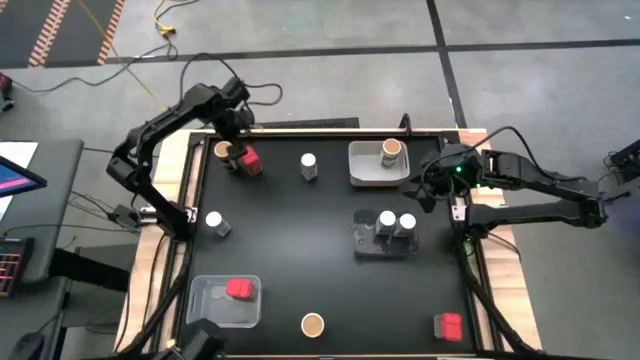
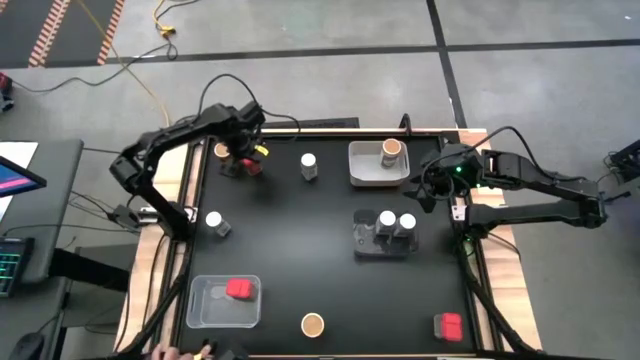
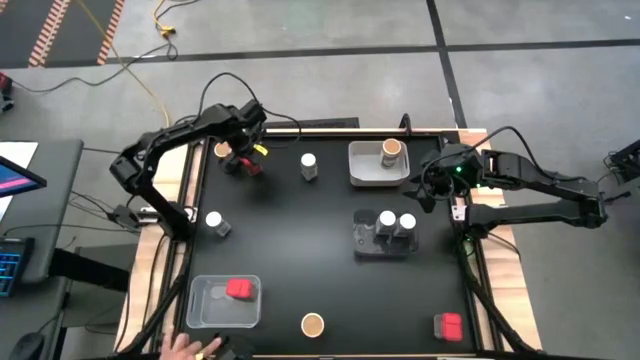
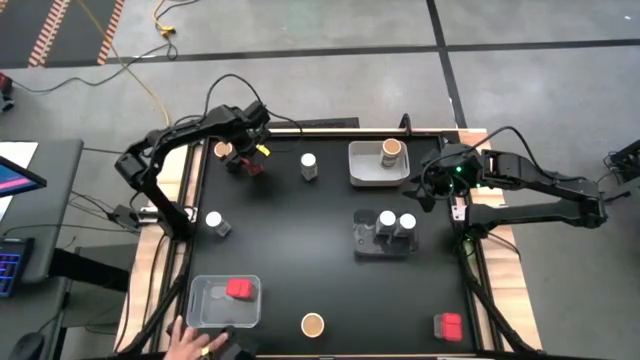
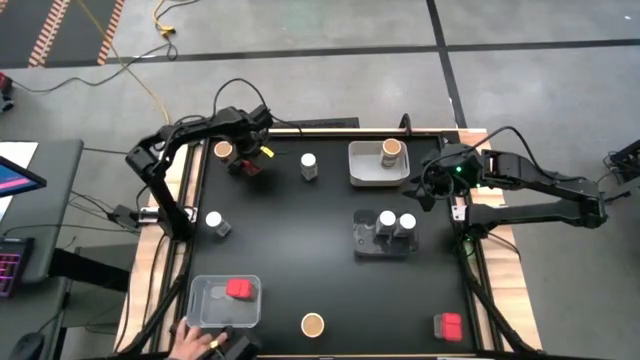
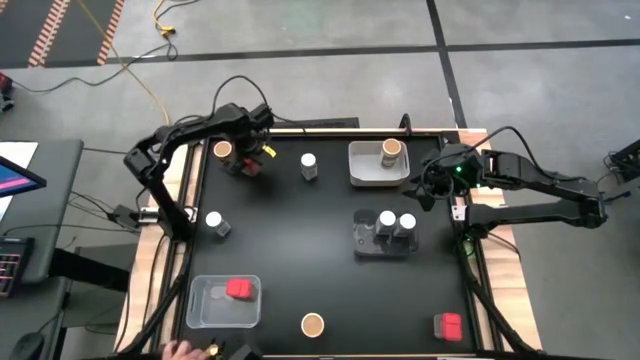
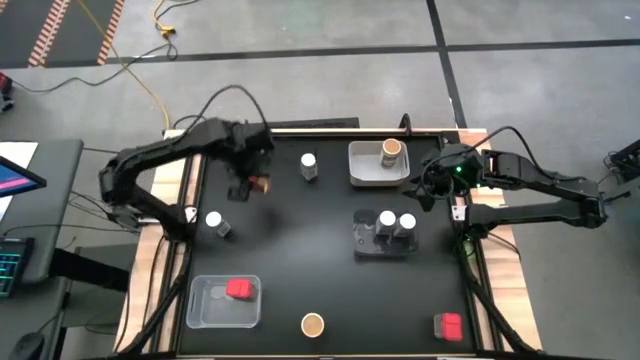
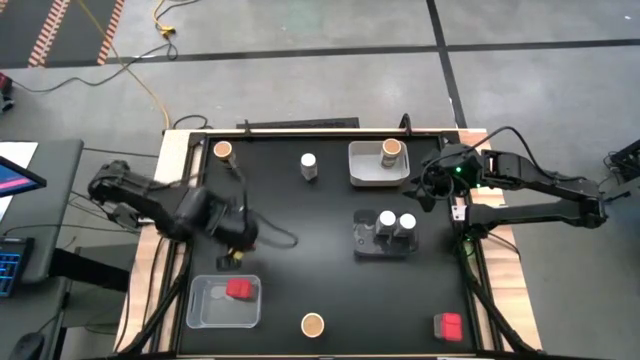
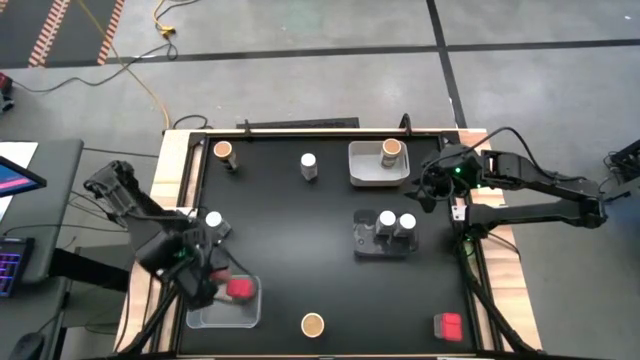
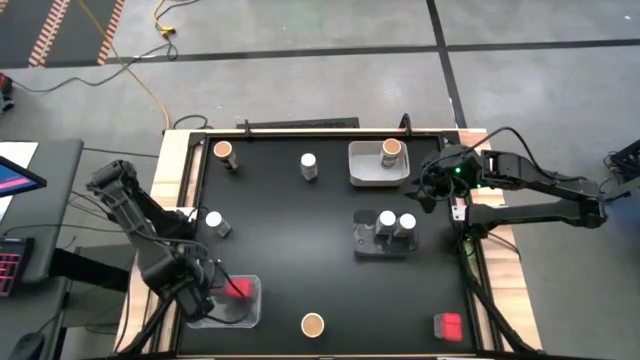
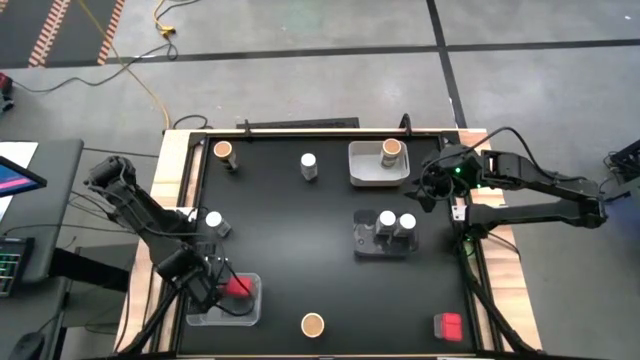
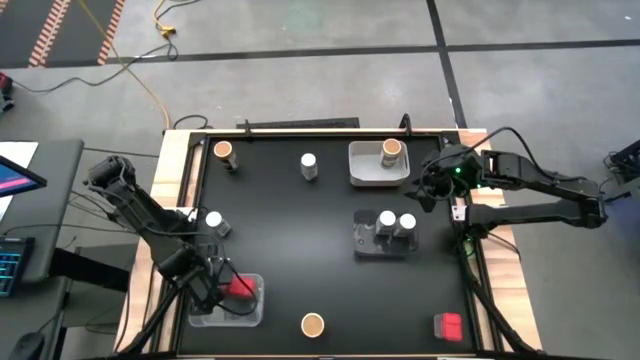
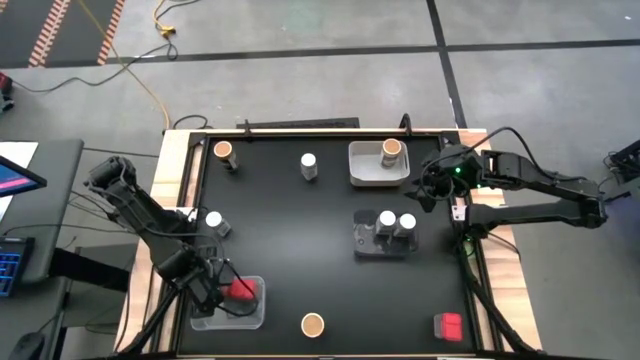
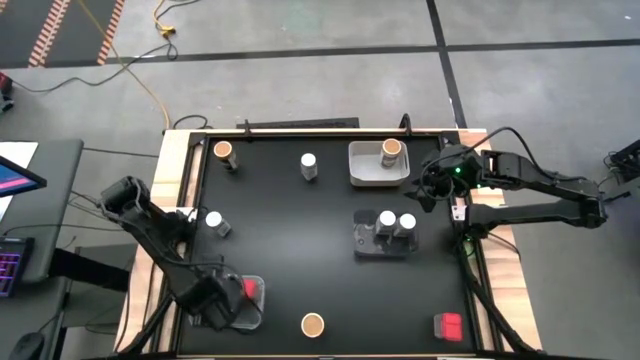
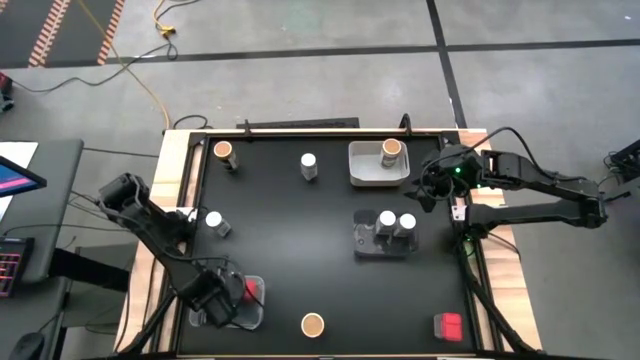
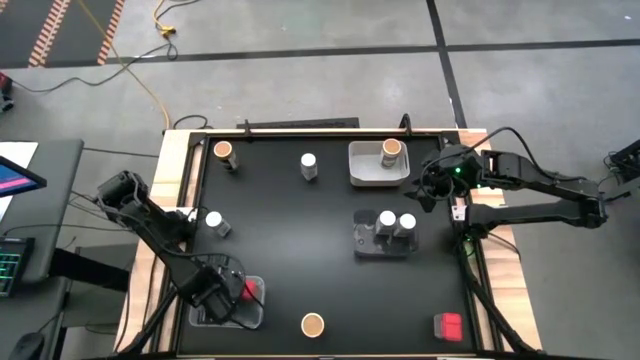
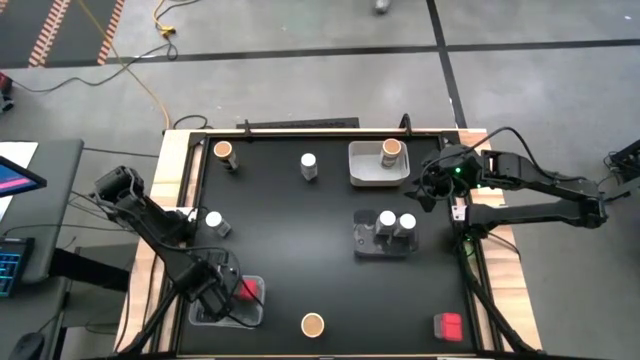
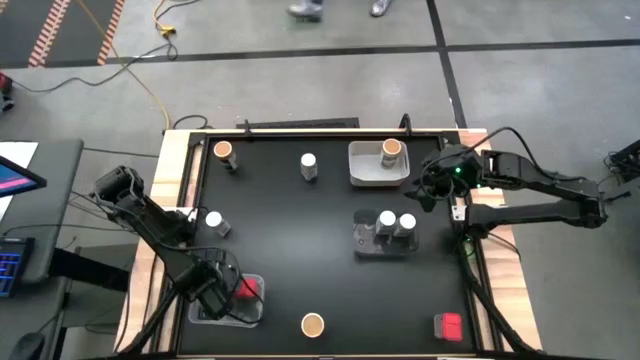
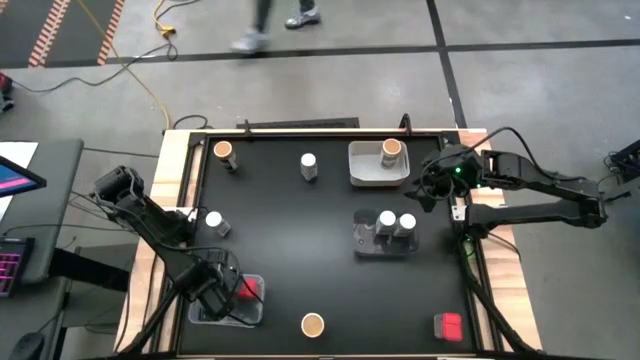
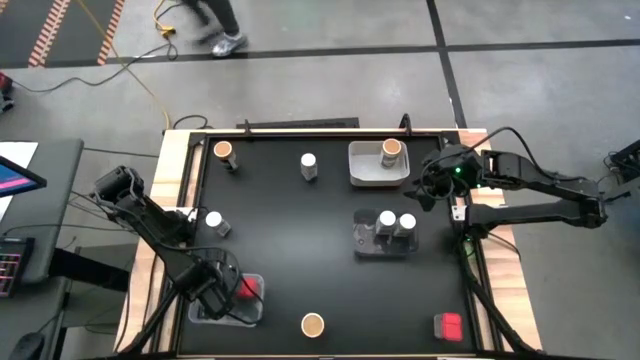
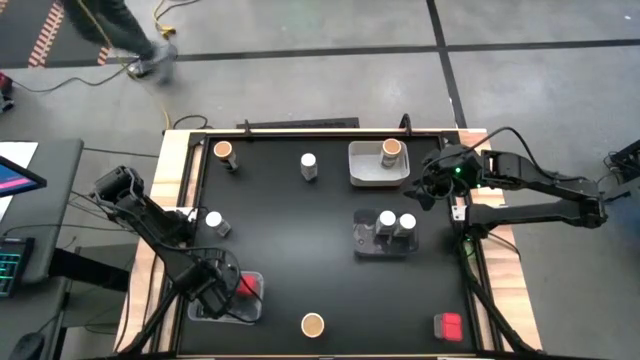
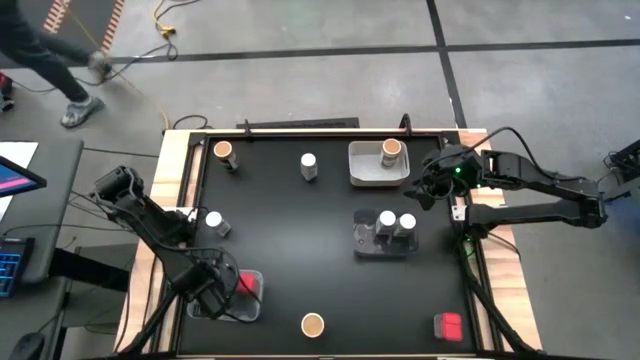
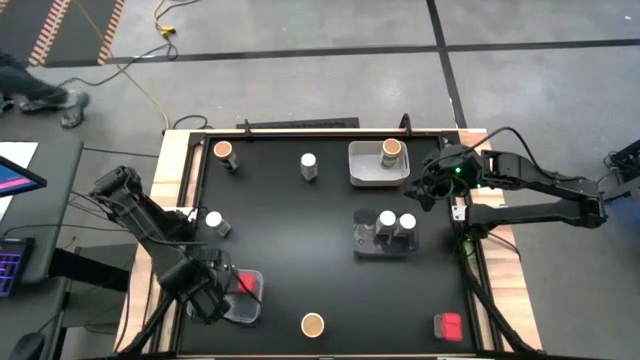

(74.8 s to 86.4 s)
Task: Sort spices by type
Put the top left red spice can in the transparent bin

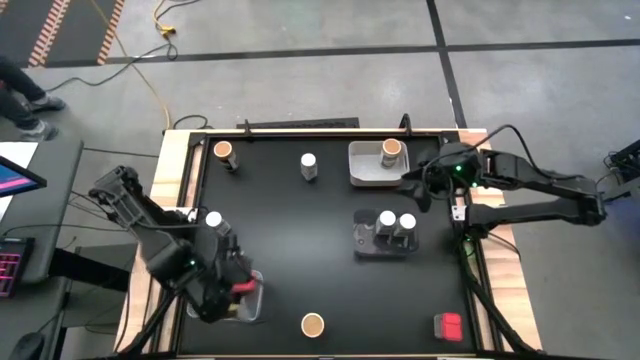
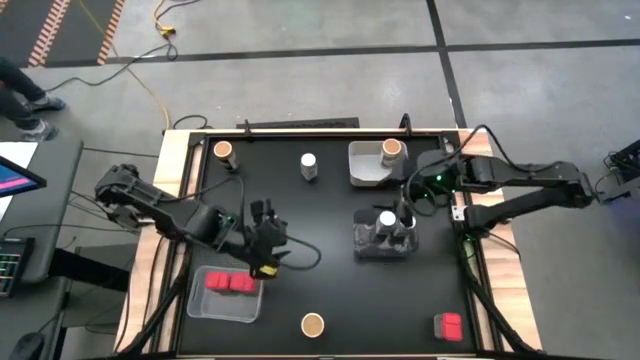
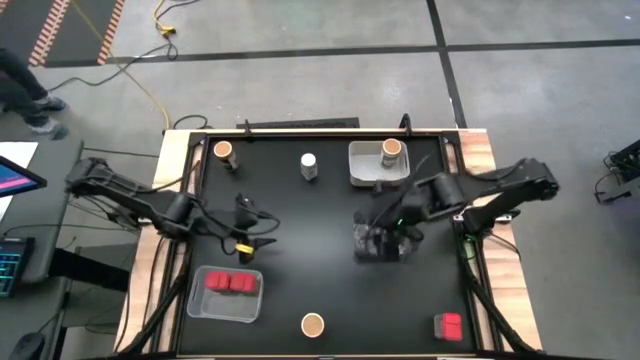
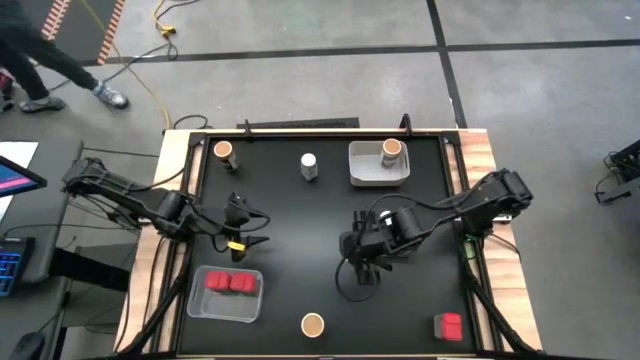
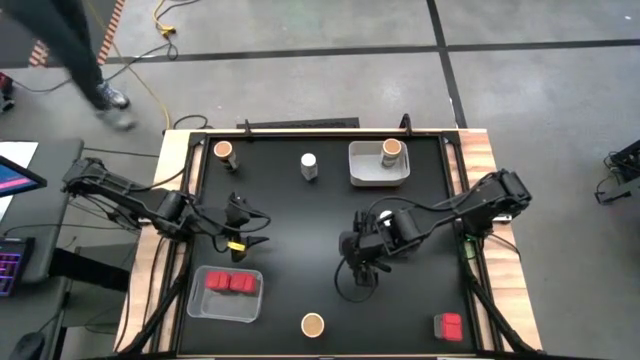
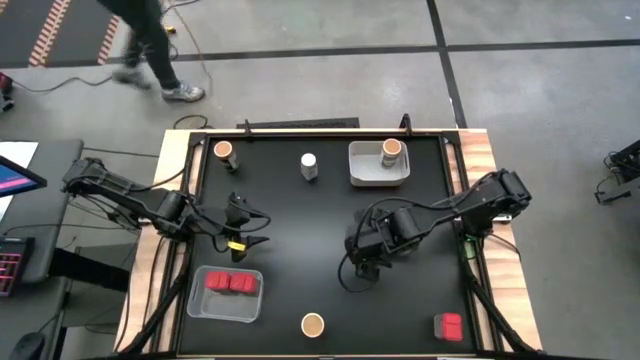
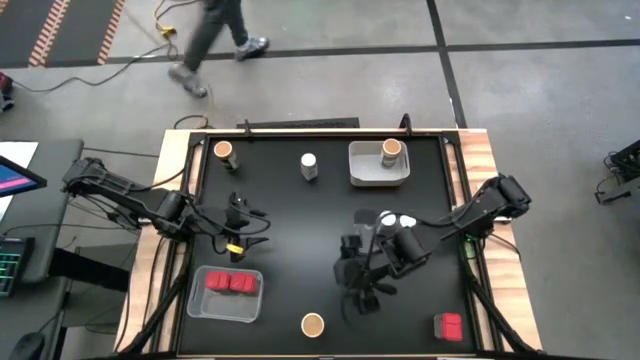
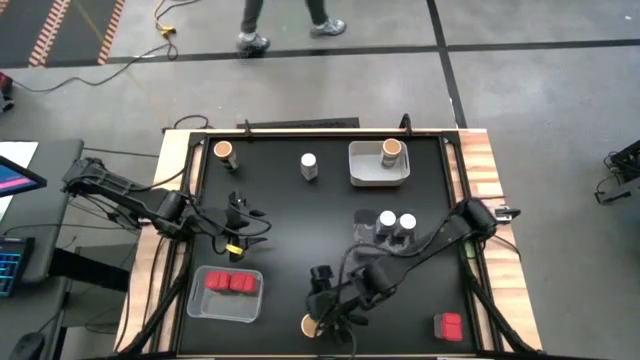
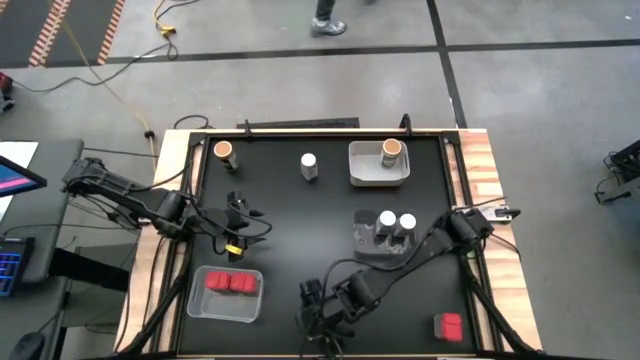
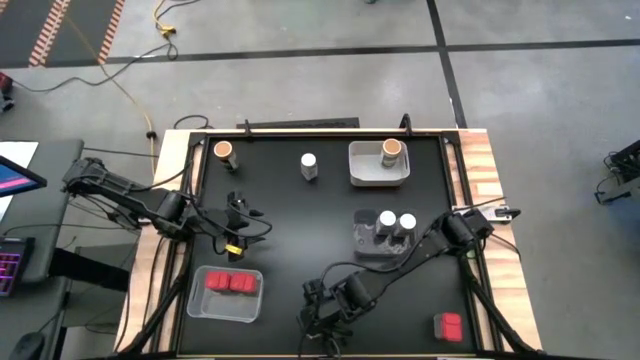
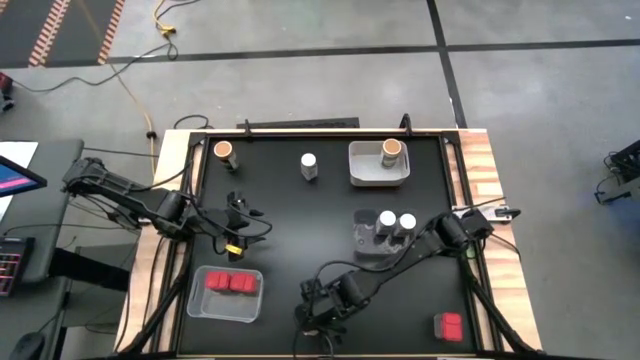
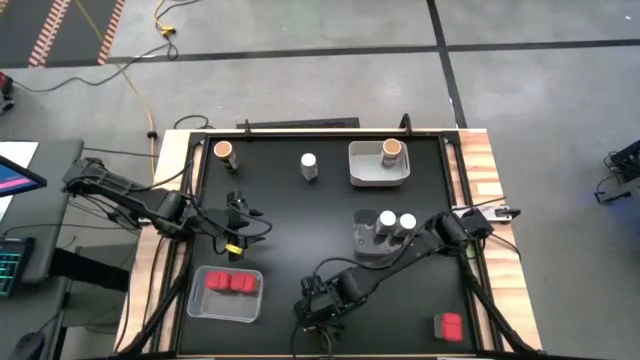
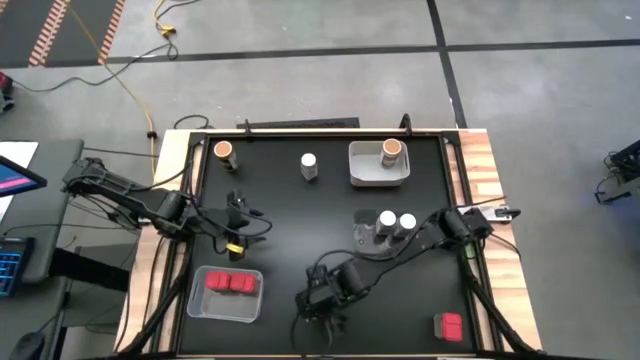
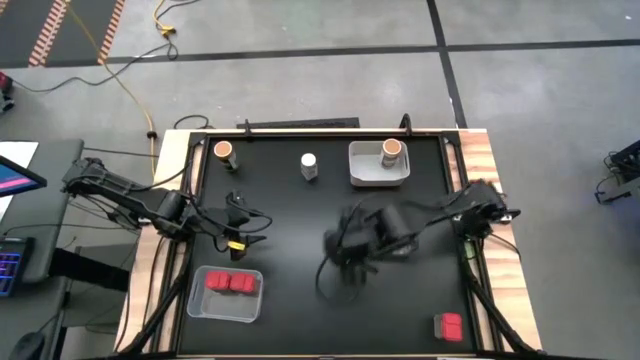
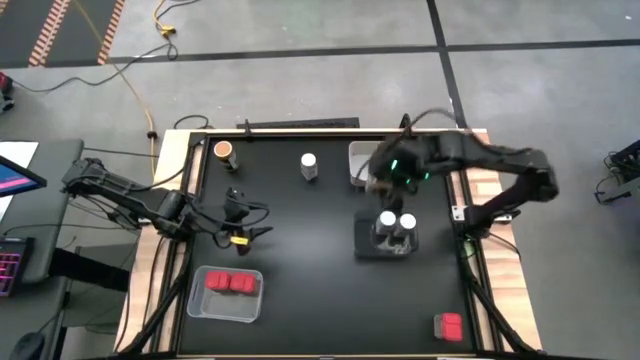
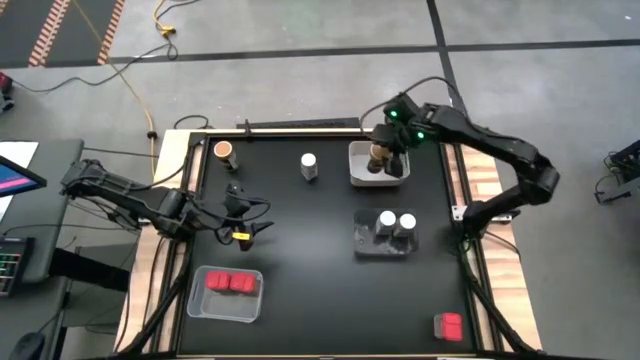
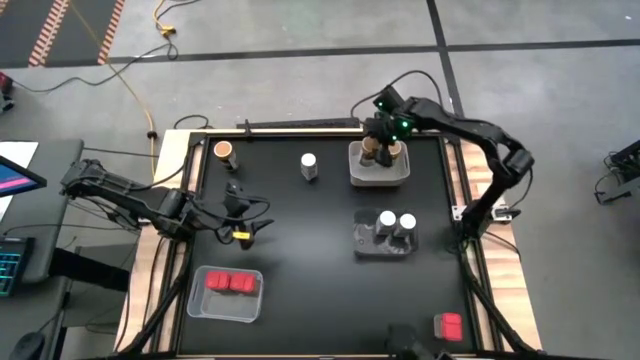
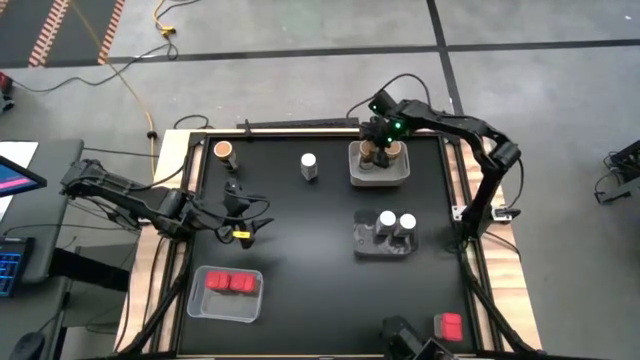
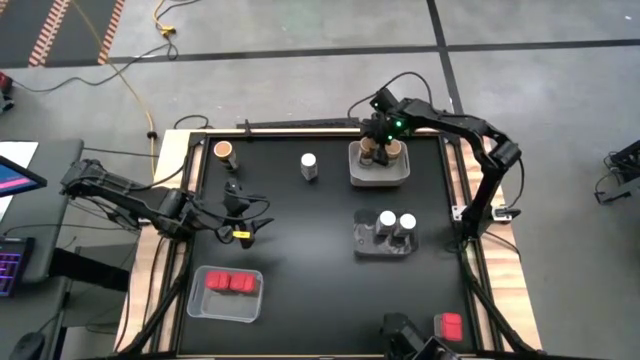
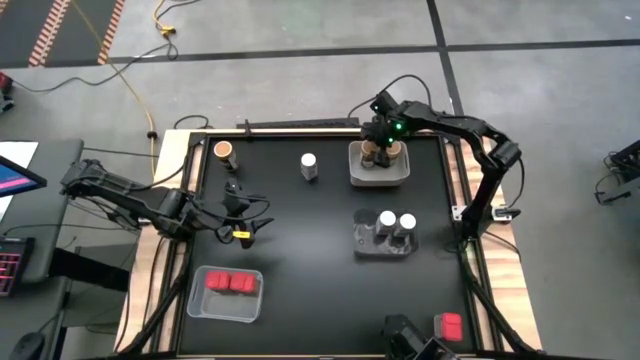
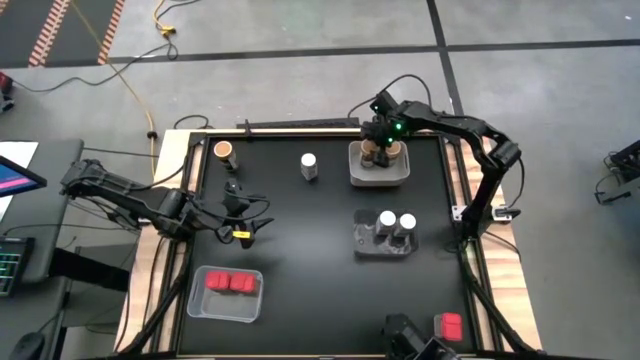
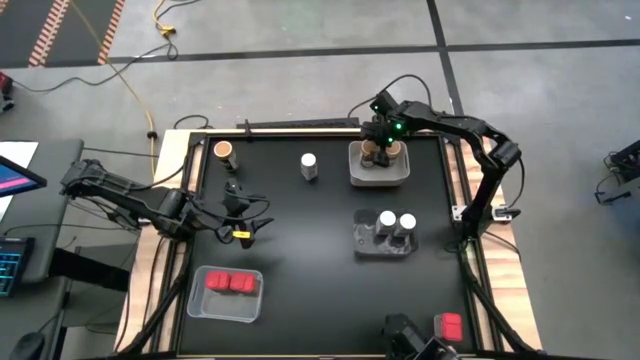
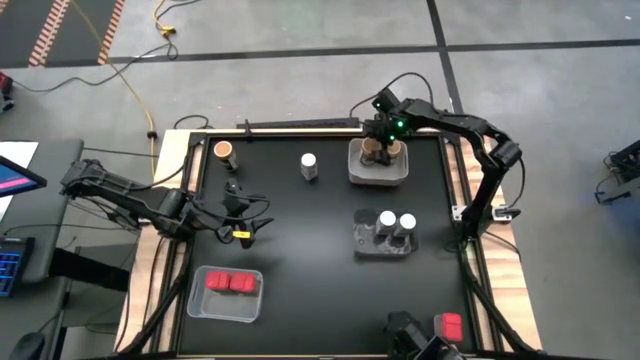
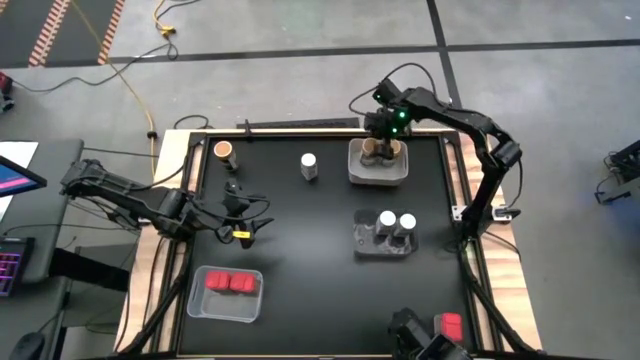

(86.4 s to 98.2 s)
Put the bottom gold spice bottle in the gray bin
